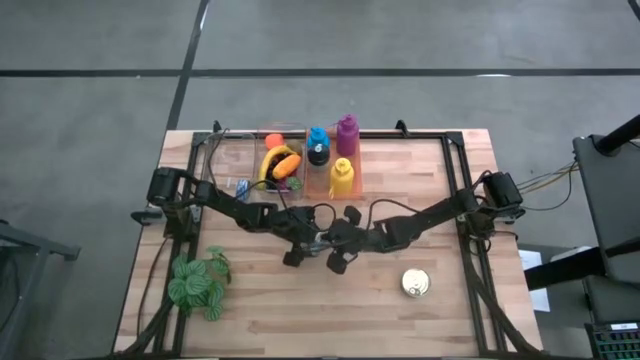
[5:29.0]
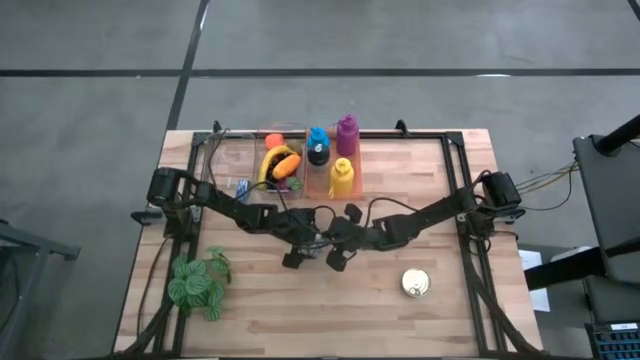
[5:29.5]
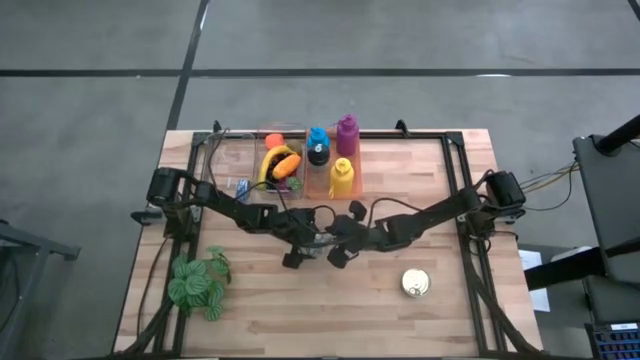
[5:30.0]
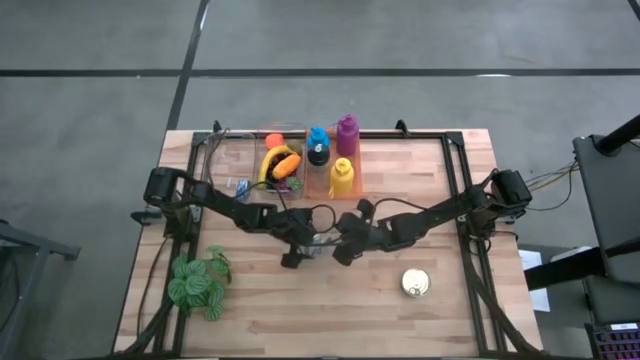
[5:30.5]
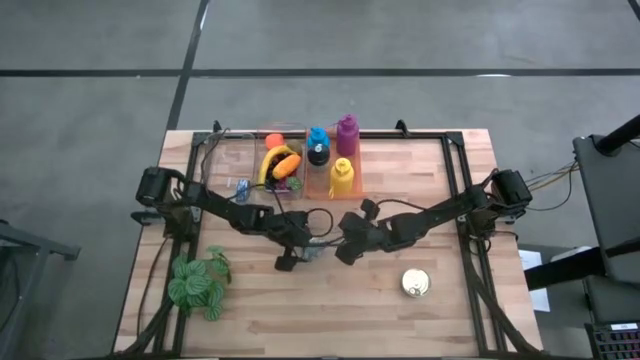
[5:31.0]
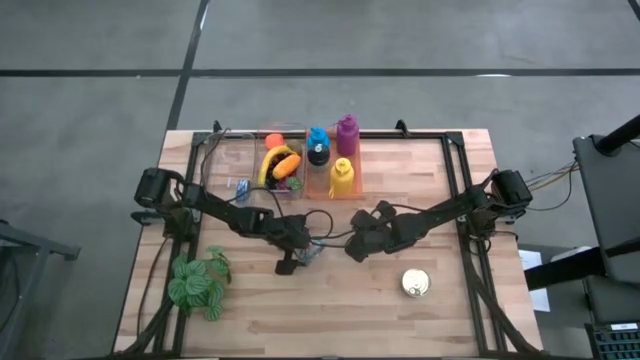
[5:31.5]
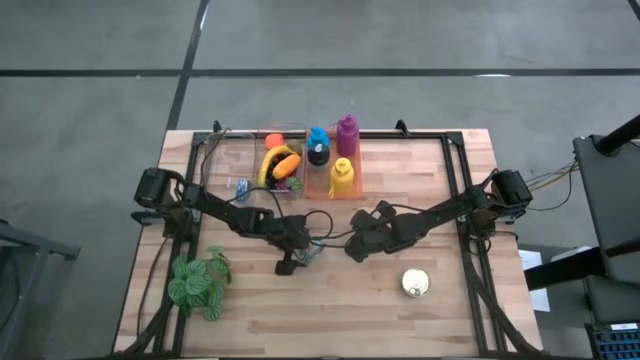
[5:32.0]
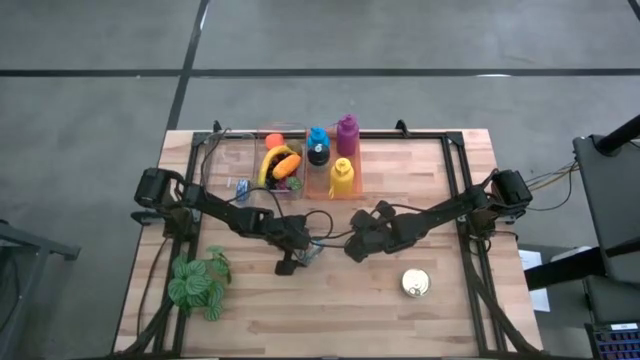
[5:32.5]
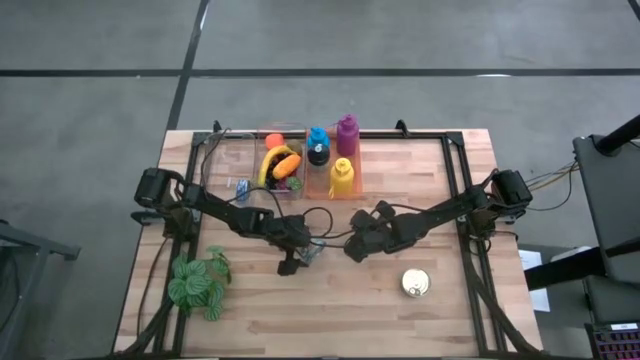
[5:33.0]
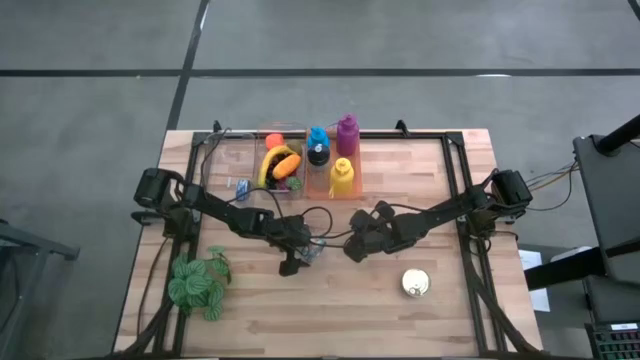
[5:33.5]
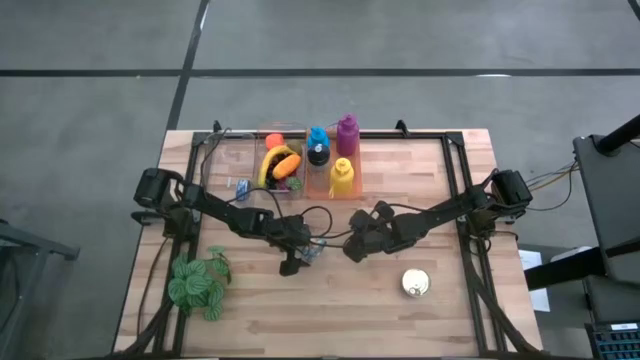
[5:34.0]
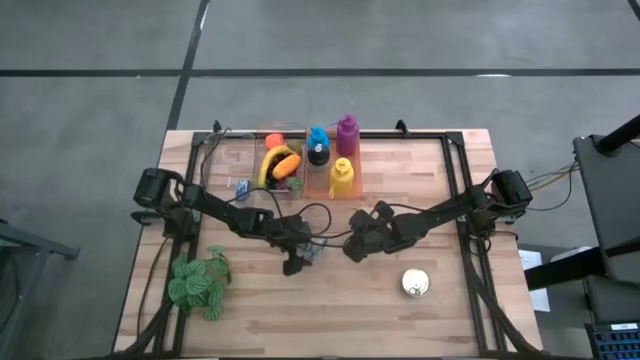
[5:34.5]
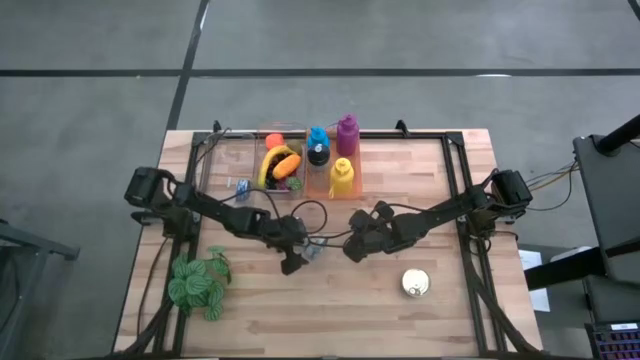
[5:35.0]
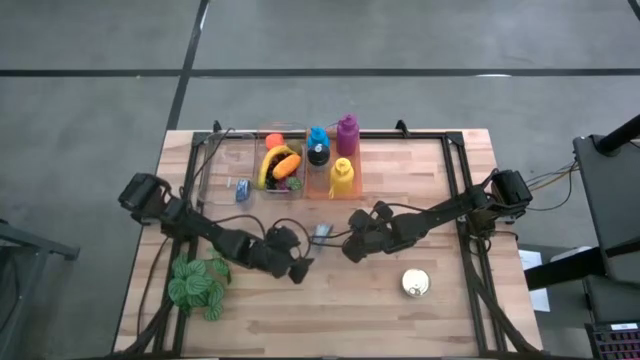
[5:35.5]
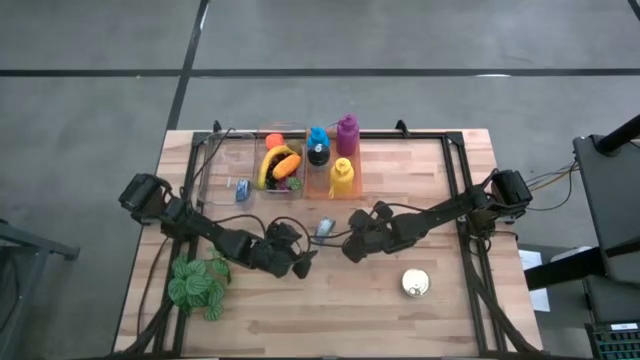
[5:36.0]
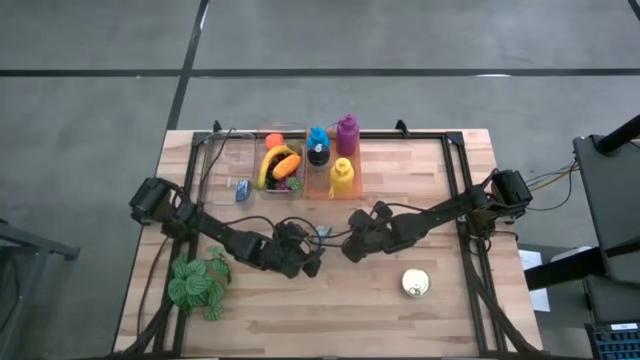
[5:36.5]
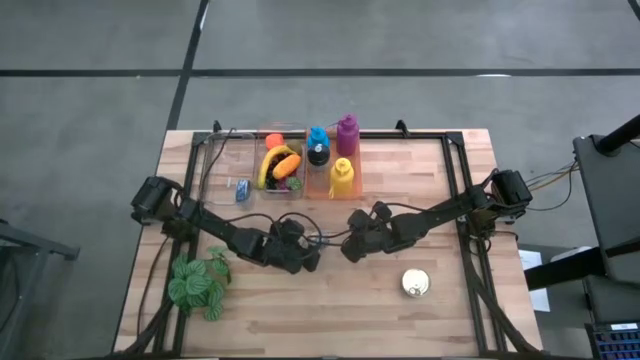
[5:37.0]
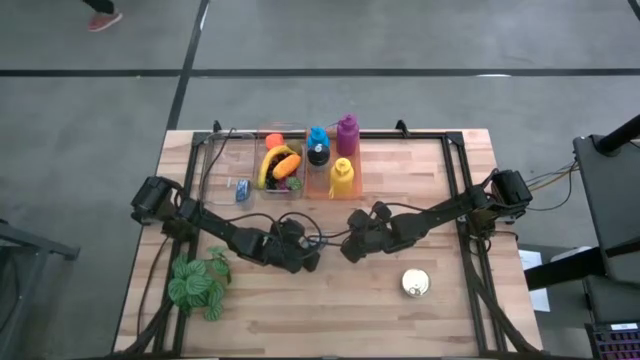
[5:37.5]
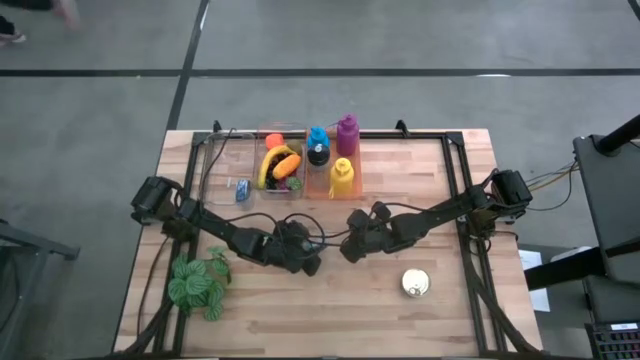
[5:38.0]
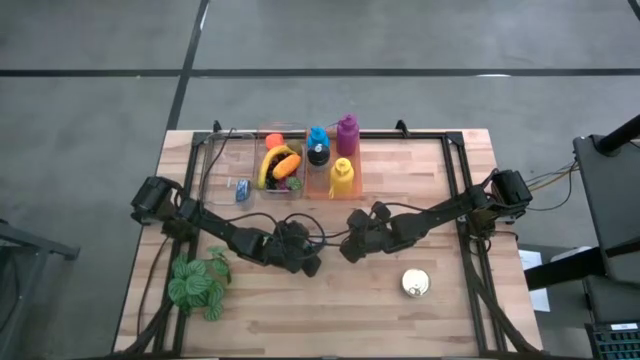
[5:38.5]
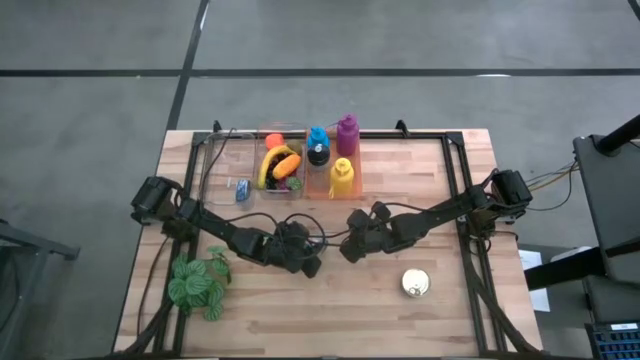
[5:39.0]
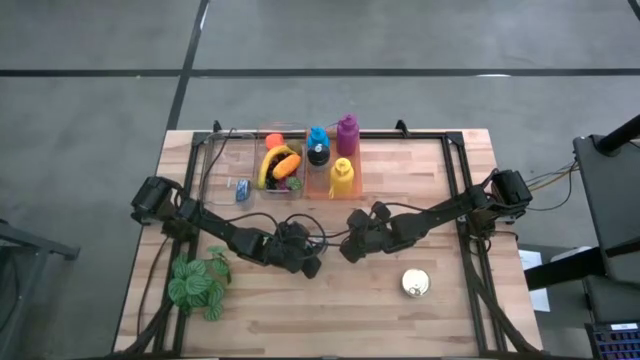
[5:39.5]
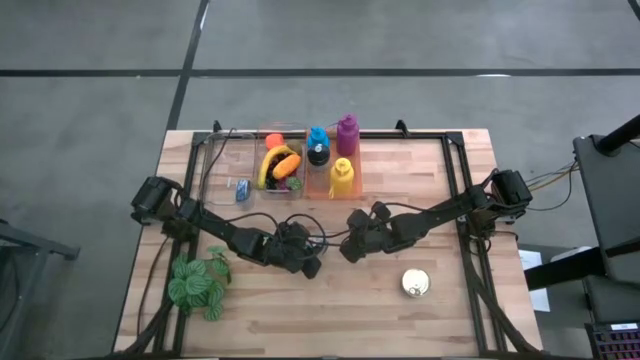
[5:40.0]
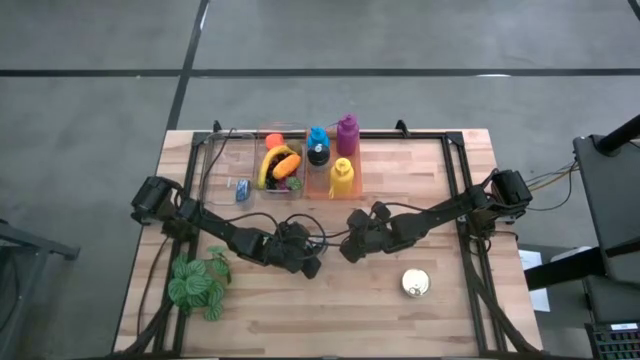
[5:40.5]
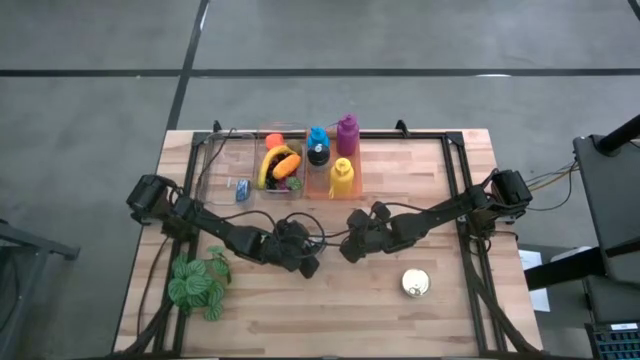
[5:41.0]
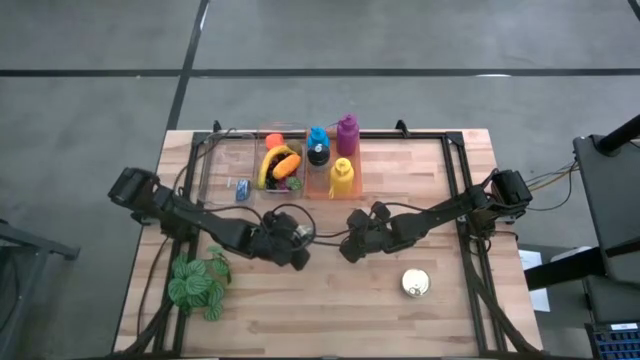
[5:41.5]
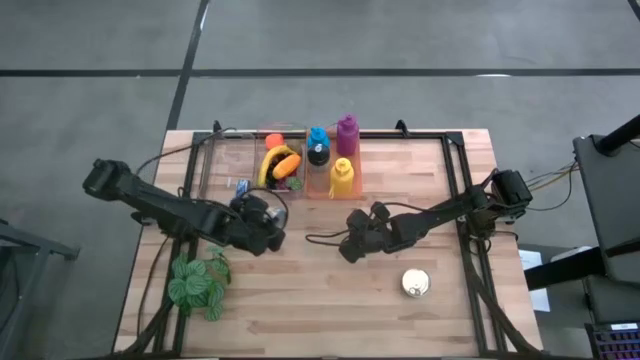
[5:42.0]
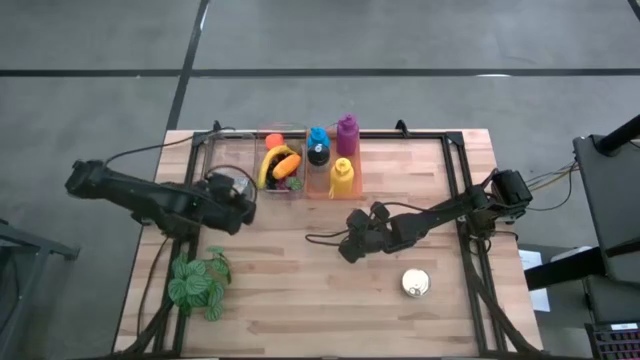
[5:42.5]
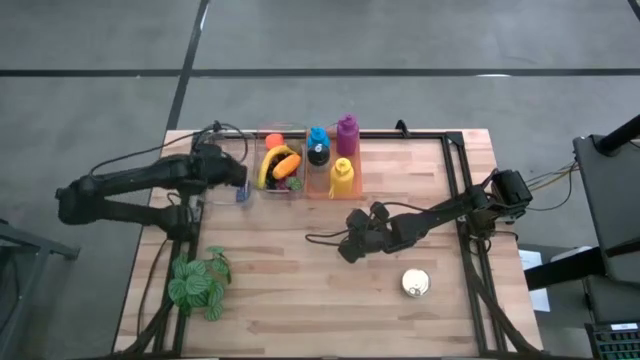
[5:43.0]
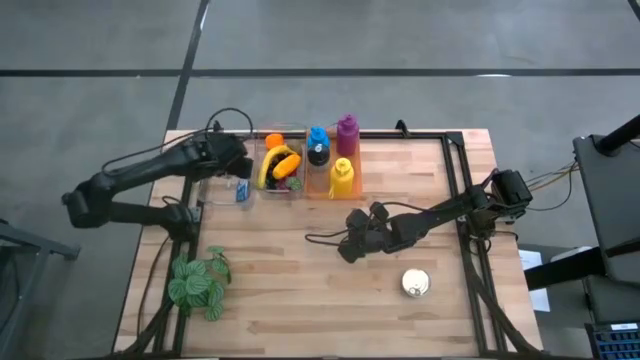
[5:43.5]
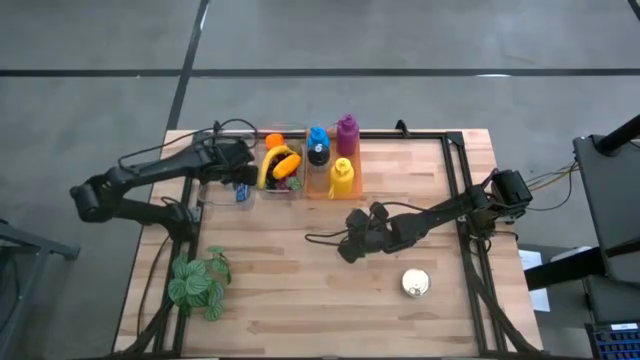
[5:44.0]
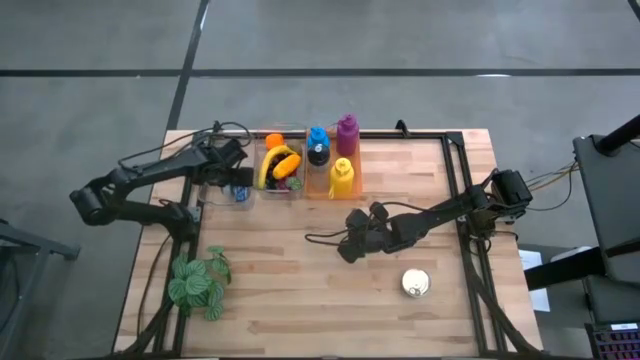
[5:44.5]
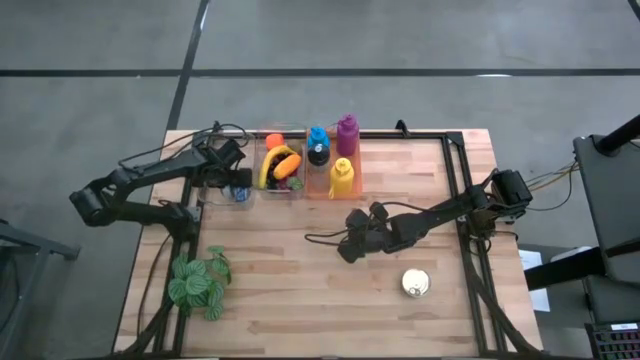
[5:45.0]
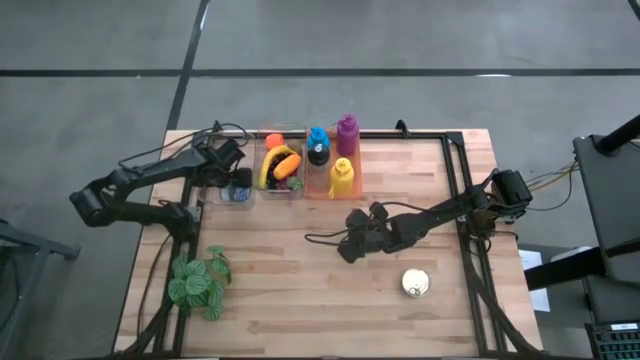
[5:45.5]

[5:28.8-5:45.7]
Task: Pick & Place Food Item
Put the light blue tuna can into the left transparent bin
